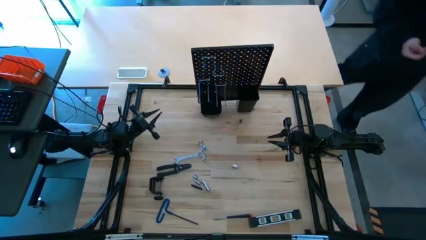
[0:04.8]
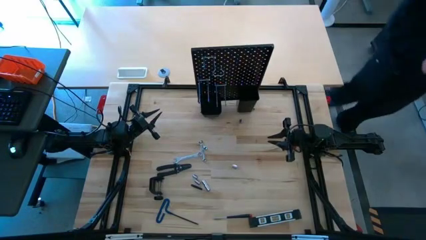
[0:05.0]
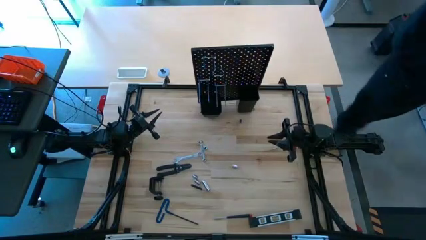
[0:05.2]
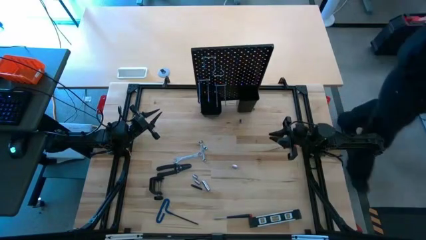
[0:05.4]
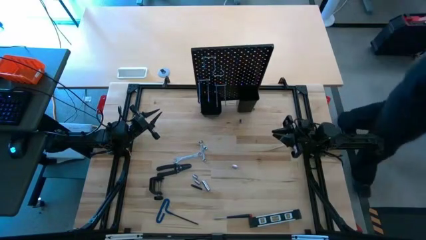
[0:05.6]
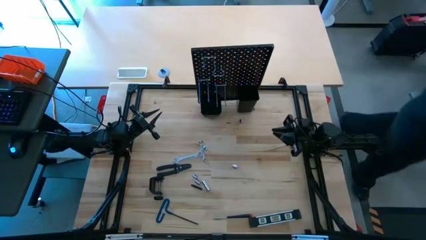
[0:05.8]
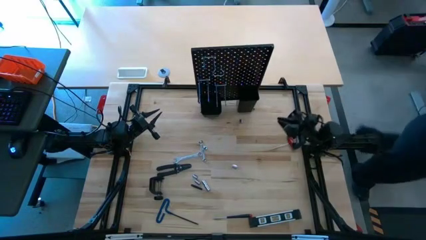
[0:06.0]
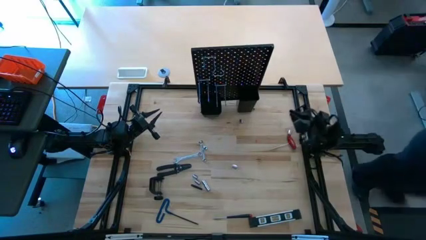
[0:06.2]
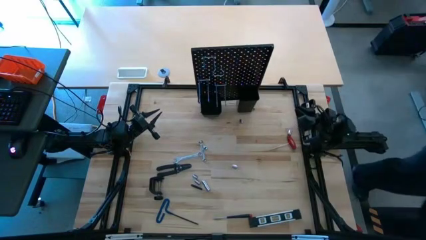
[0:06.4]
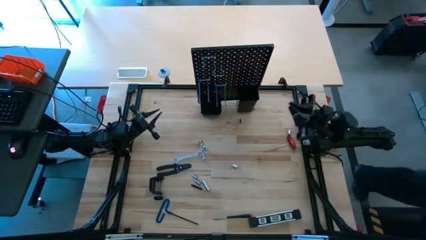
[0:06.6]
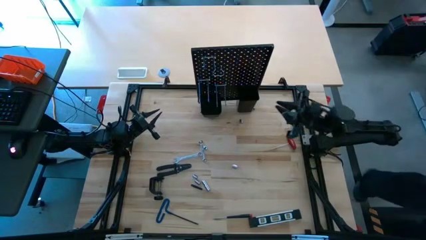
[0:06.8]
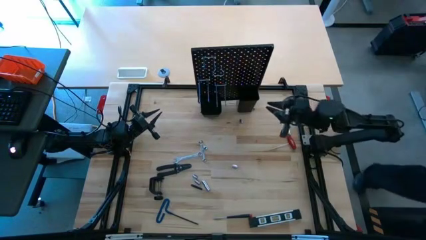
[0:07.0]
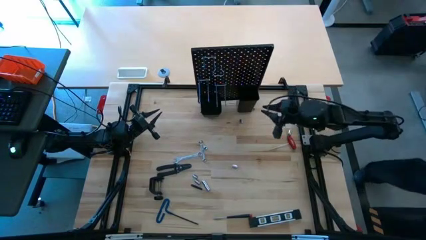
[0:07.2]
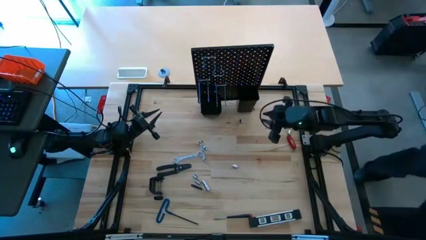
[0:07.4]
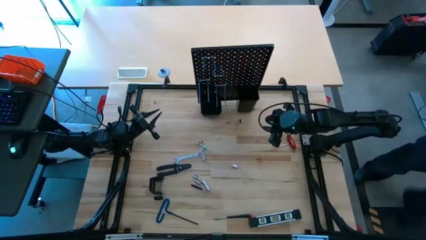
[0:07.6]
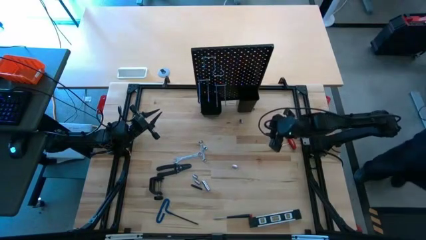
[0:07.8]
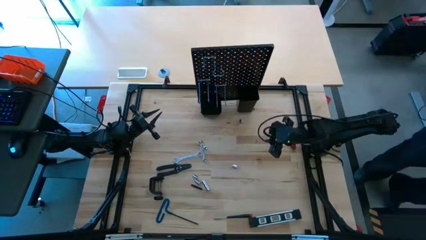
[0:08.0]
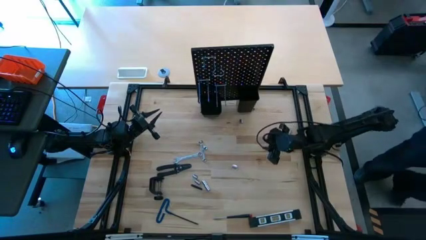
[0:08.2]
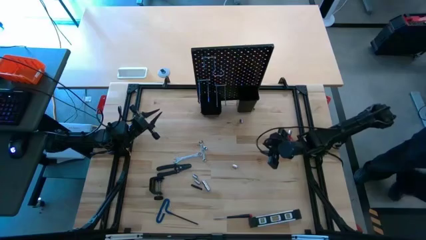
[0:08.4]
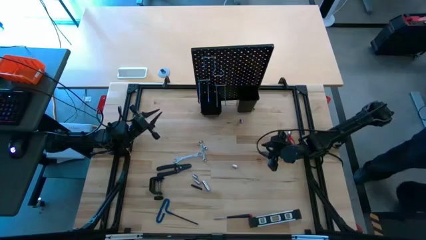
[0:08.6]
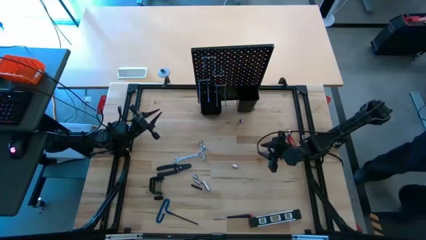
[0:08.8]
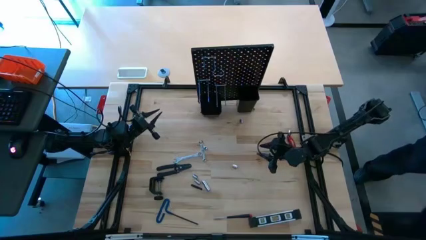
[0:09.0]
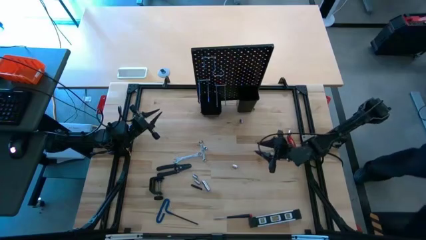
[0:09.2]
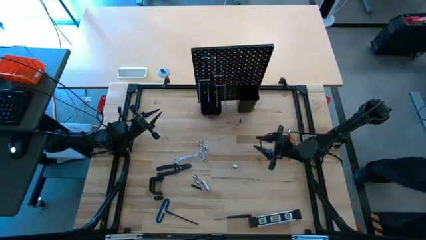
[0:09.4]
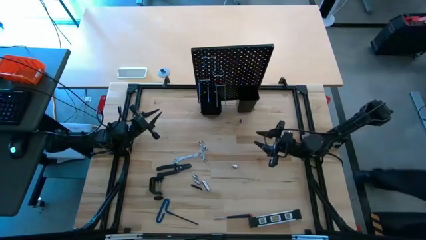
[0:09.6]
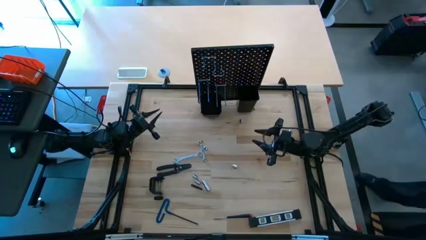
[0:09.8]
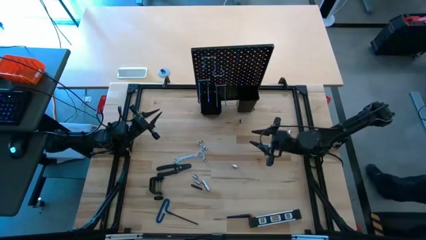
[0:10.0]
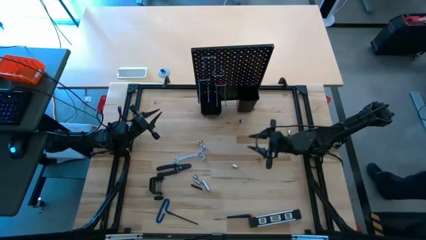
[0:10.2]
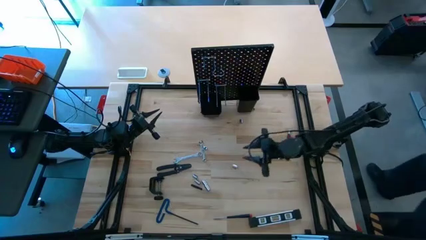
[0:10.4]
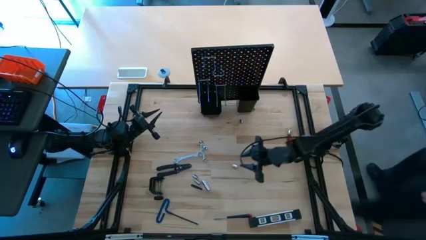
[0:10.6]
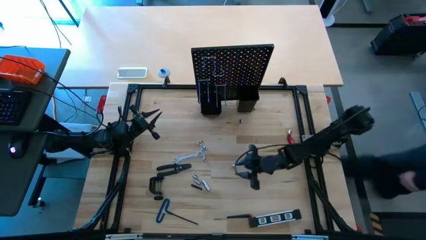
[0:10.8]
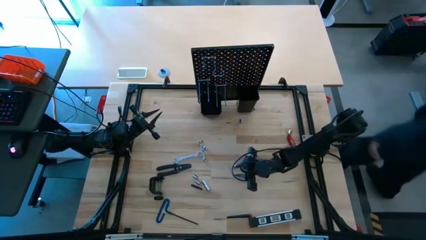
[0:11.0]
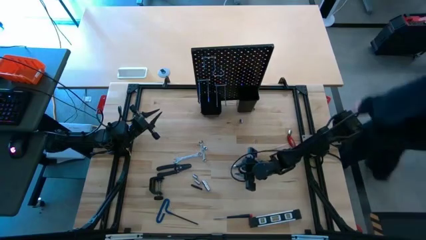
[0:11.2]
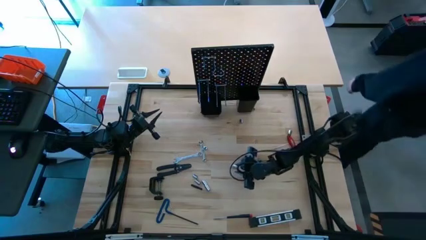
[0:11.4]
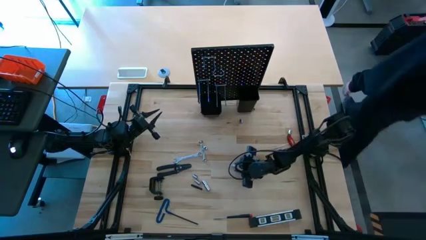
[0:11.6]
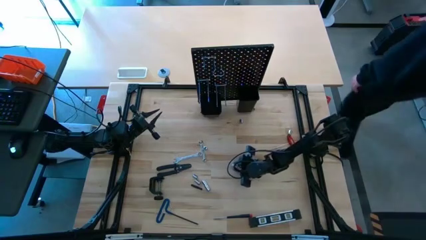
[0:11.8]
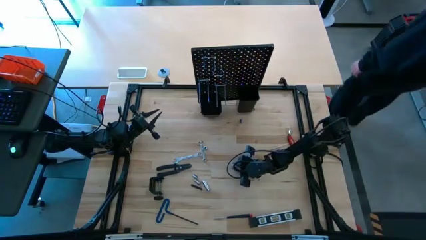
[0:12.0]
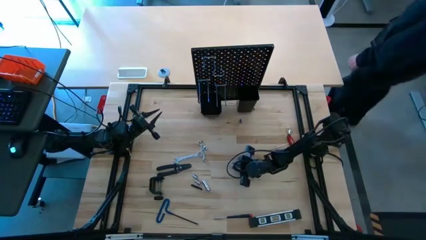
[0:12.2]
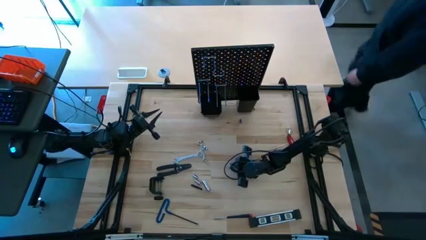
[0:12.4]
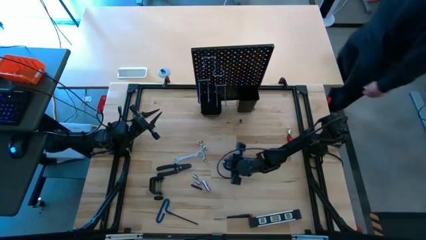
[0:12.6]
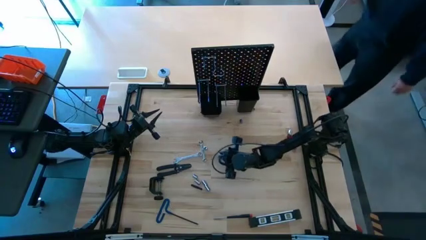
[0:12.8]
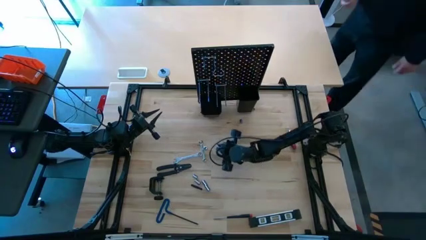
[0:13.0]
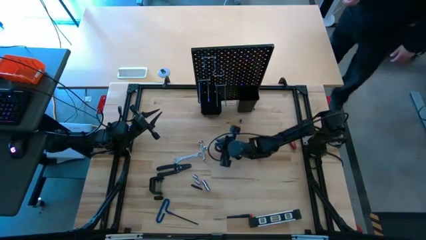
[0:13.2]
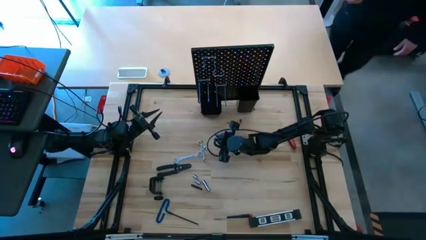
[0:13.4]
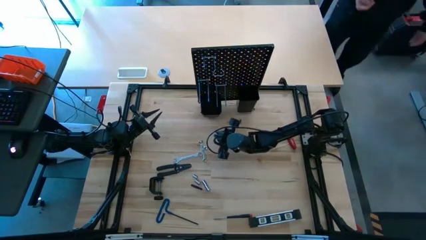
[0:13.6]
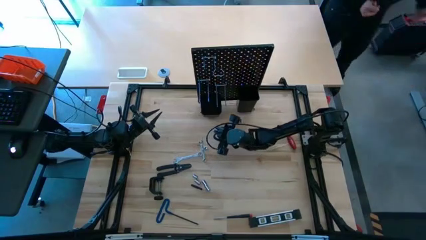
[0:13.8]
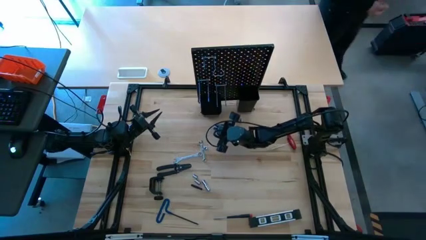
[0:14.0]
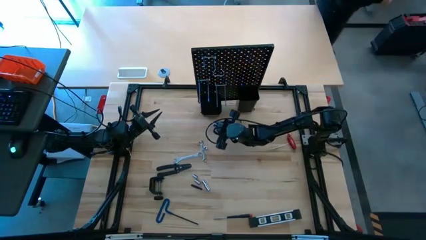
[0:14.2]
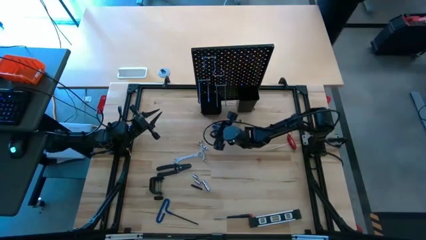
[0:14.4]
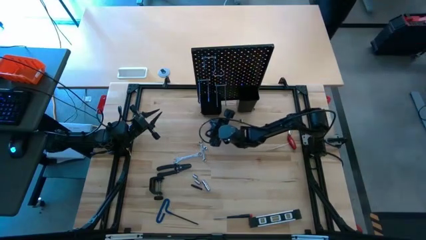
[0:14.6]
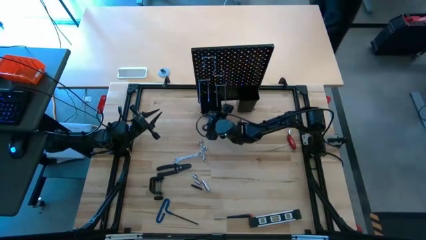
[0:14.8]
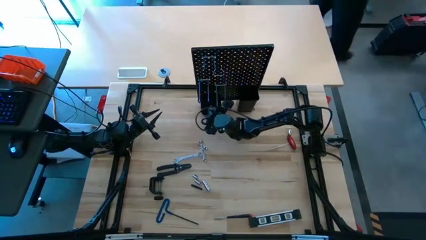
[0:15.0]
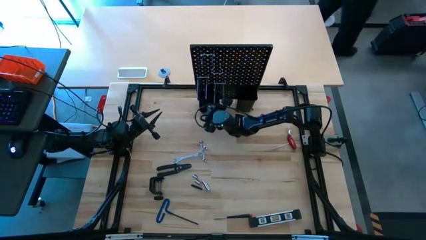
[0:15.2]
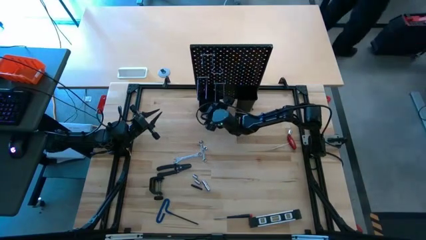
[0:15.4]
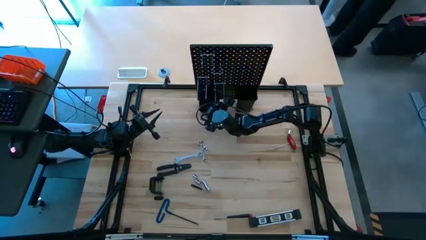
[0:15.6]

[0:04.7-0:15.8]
Task: Hang tools onto peg board
Put the socket into the left bin on the pegboard

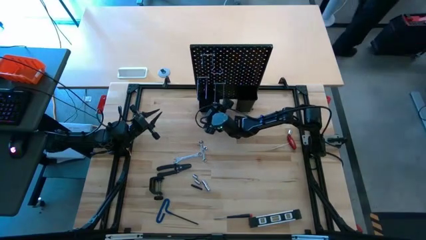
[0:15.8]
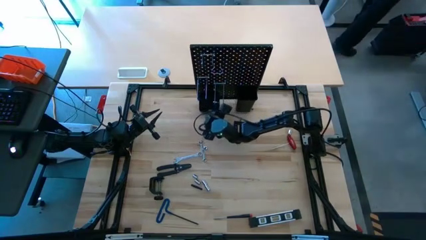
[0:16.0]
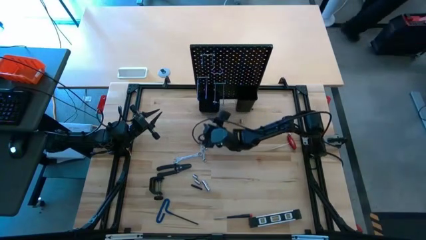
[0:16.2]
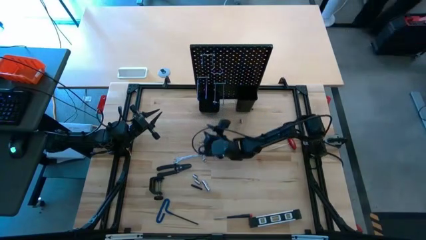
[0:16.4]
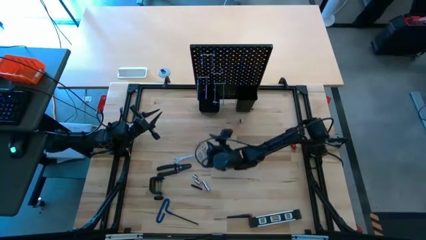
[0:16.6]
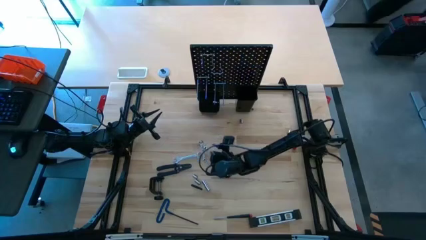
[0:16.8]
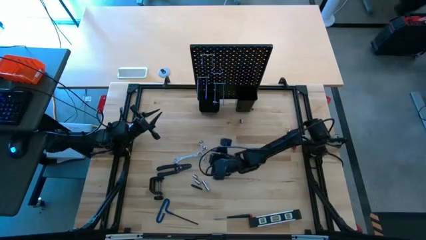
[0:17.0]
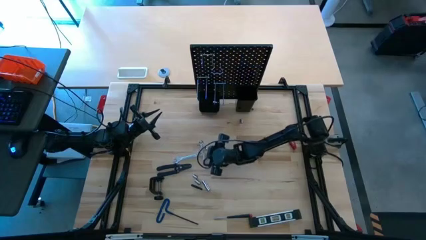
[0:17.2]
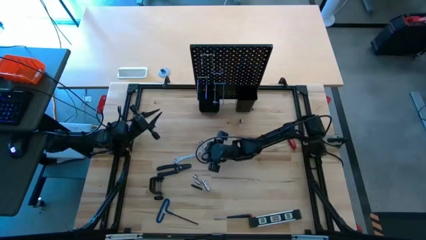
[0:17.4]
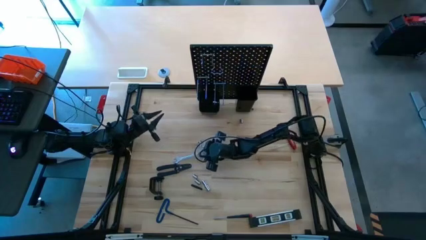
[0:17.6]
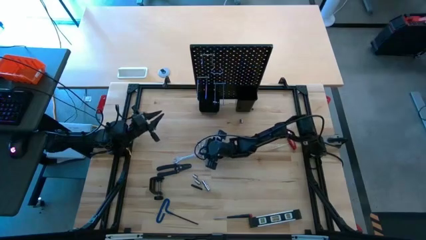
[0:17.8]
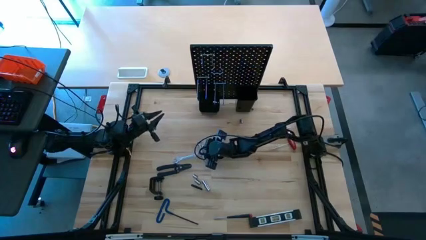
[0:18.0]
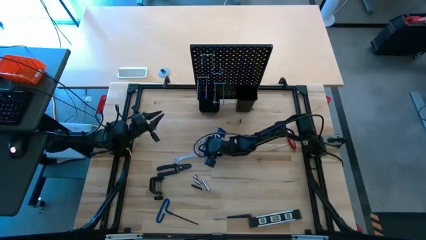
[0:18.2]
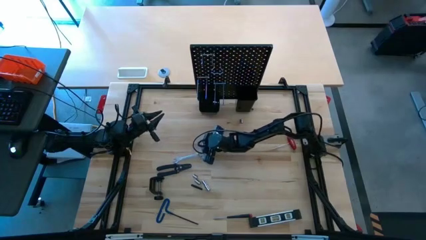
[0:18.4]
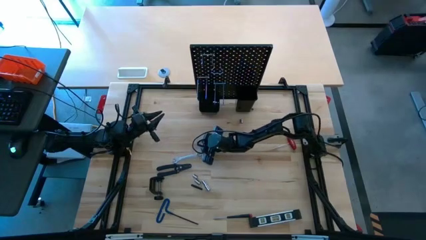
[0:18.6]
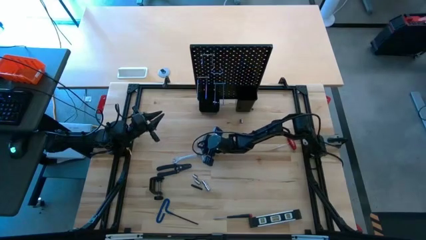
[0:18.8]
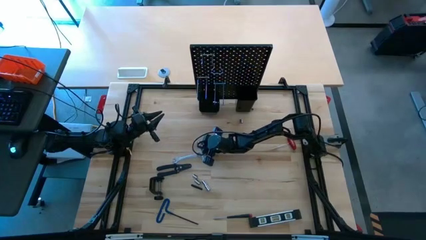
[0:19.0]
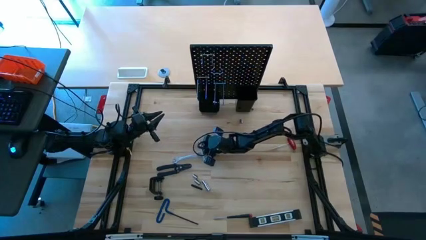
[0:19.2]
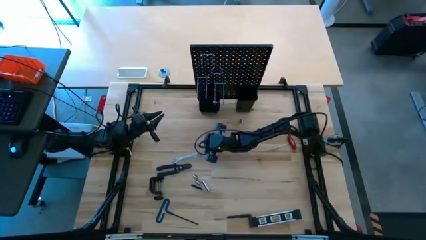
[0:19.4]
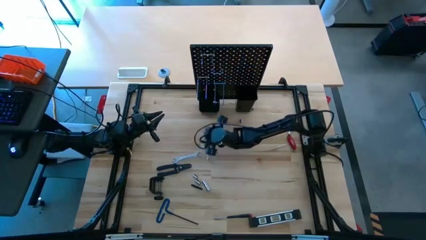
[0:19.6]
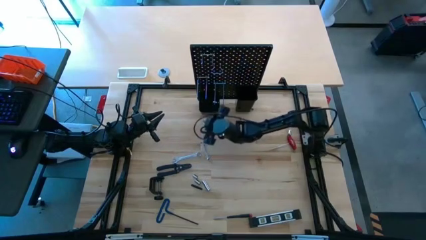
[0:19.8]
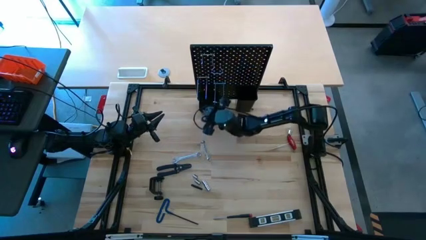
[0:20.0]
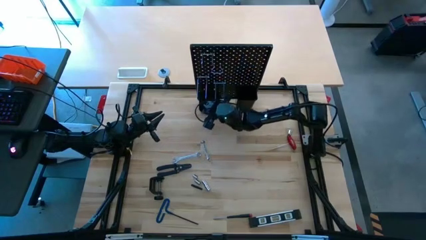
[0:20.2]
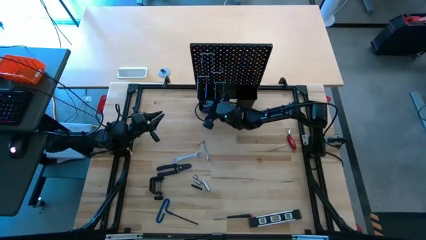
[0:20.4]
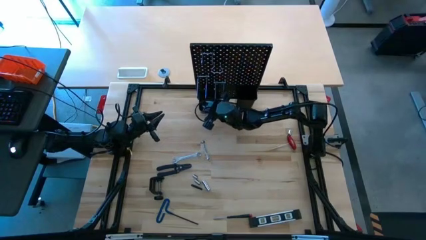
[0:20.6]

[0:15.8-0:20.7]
Put the socket into the left bin on the pegboard
